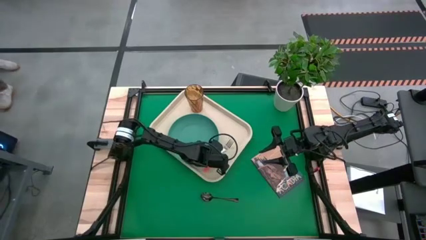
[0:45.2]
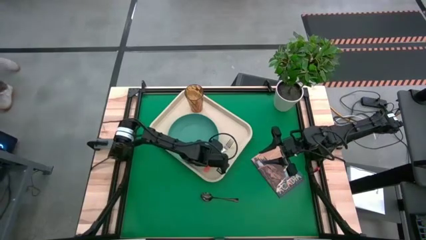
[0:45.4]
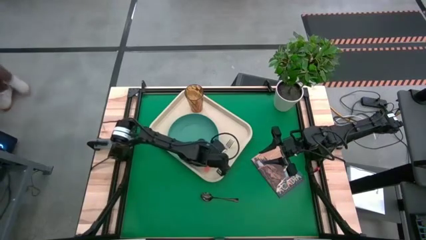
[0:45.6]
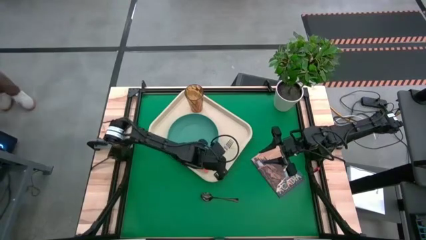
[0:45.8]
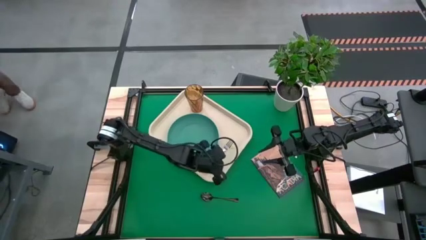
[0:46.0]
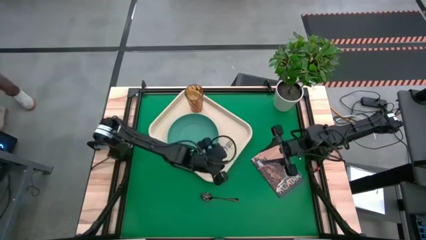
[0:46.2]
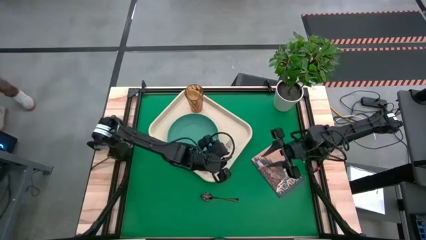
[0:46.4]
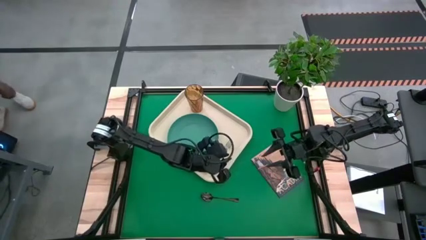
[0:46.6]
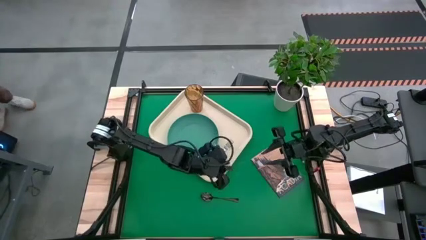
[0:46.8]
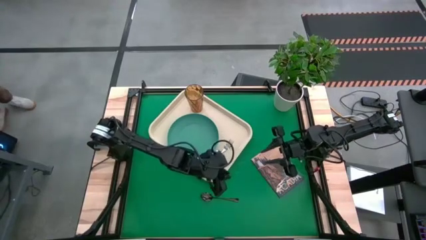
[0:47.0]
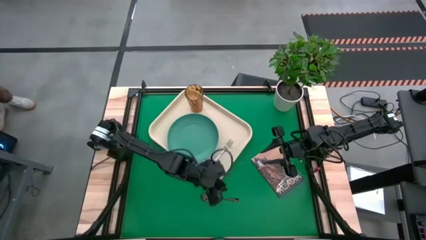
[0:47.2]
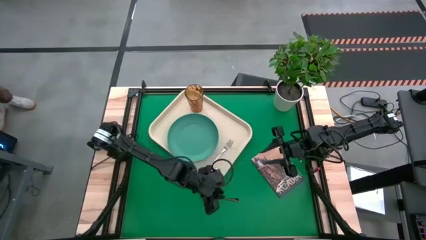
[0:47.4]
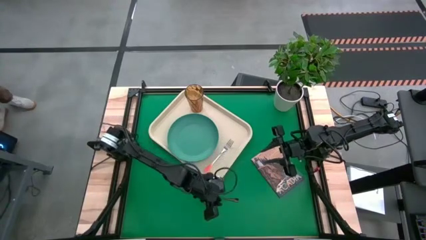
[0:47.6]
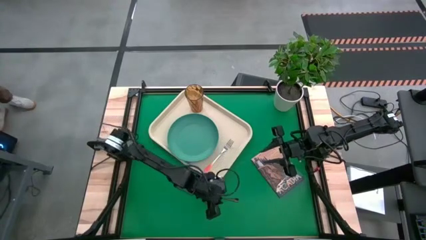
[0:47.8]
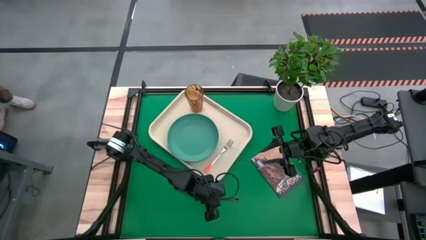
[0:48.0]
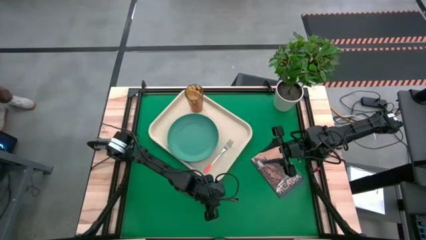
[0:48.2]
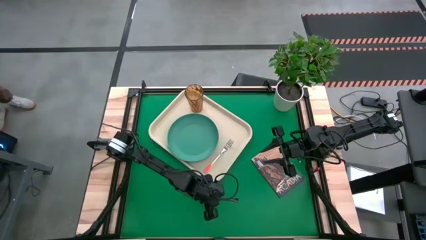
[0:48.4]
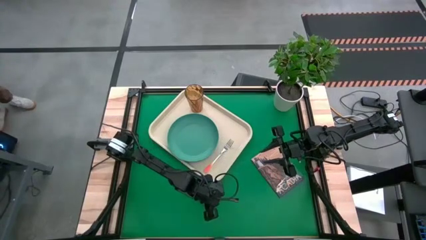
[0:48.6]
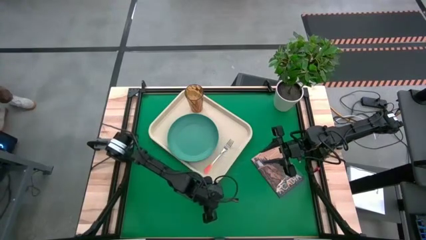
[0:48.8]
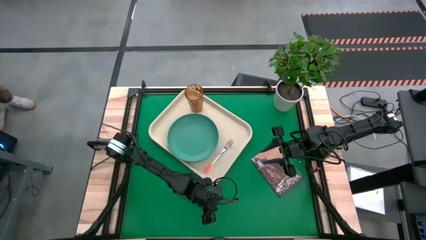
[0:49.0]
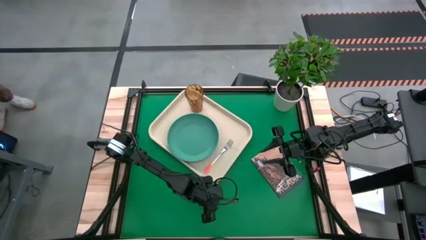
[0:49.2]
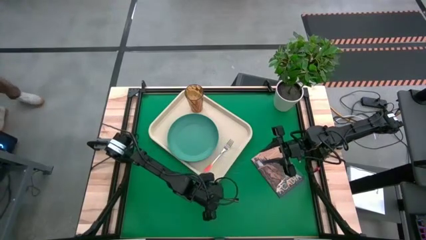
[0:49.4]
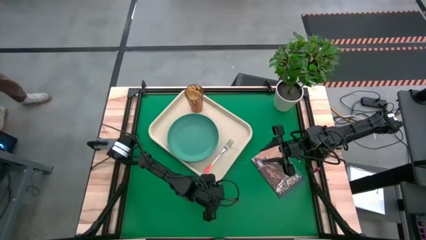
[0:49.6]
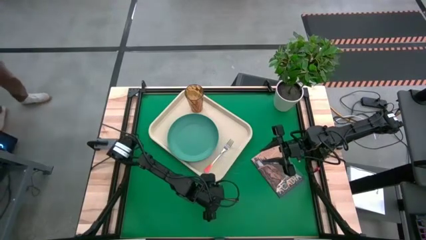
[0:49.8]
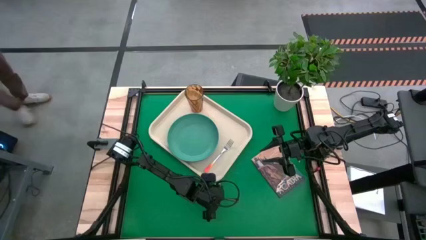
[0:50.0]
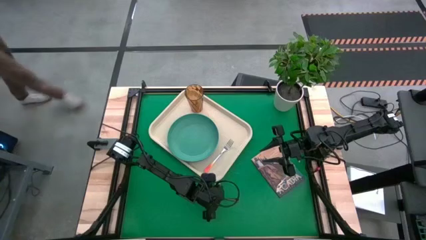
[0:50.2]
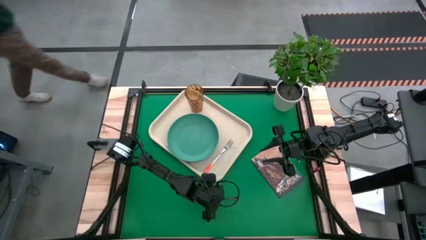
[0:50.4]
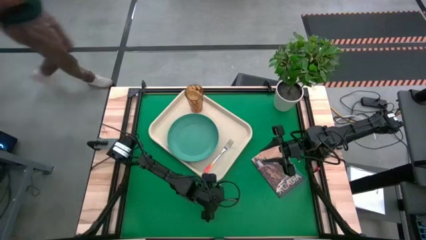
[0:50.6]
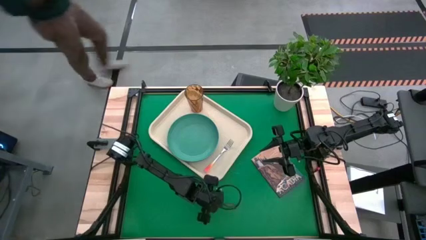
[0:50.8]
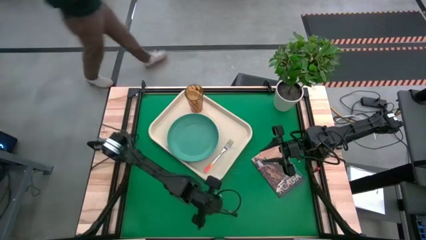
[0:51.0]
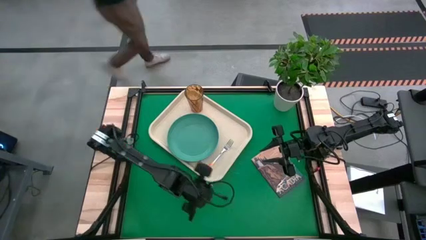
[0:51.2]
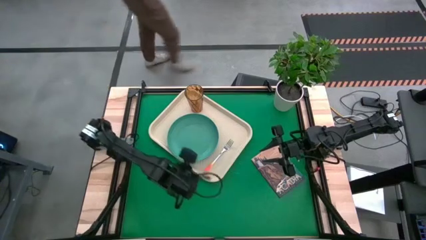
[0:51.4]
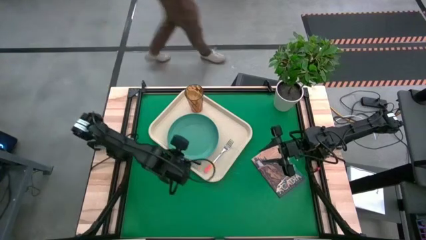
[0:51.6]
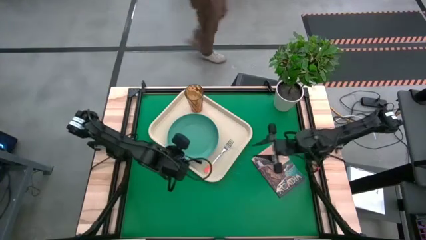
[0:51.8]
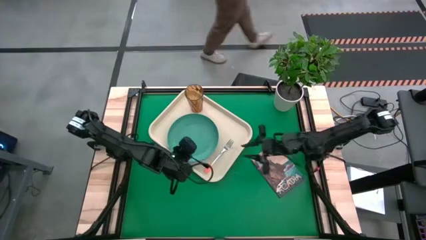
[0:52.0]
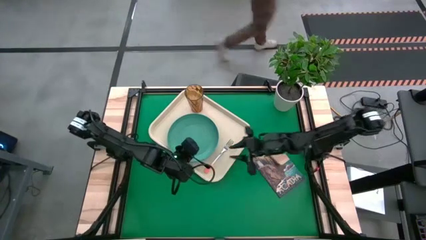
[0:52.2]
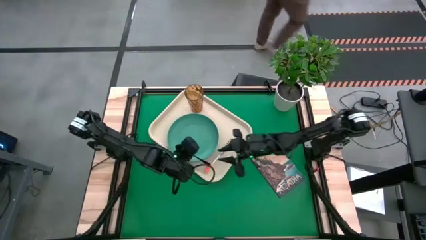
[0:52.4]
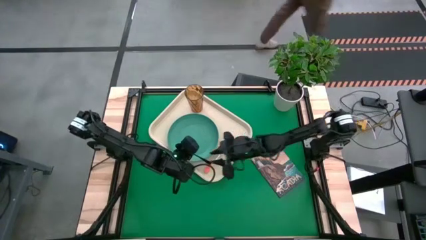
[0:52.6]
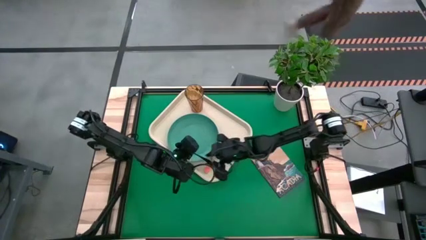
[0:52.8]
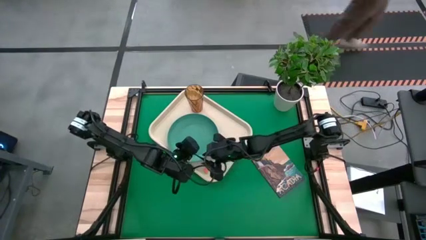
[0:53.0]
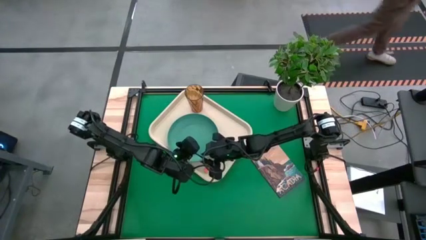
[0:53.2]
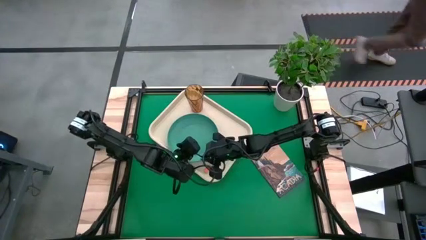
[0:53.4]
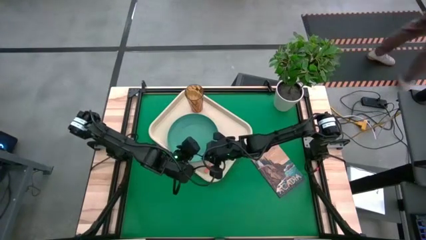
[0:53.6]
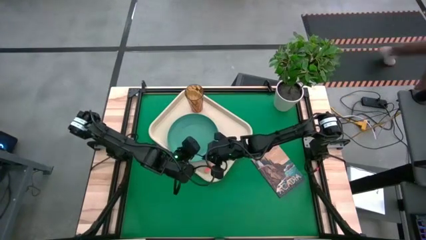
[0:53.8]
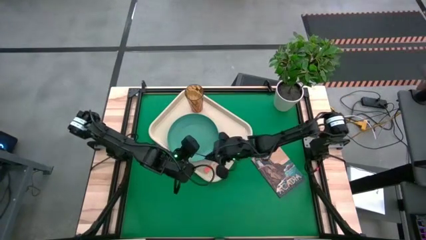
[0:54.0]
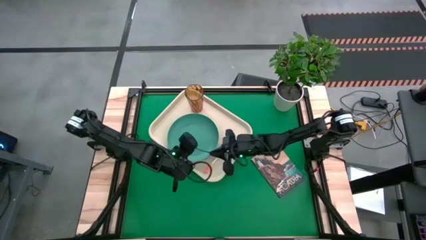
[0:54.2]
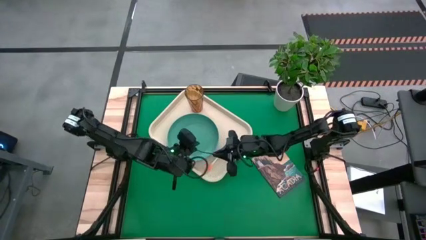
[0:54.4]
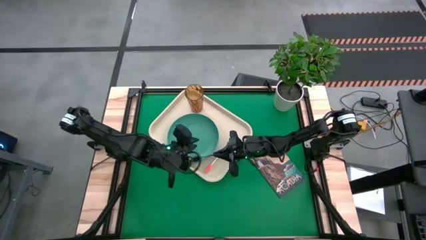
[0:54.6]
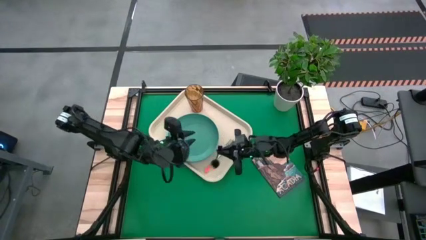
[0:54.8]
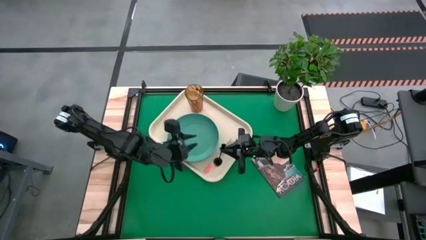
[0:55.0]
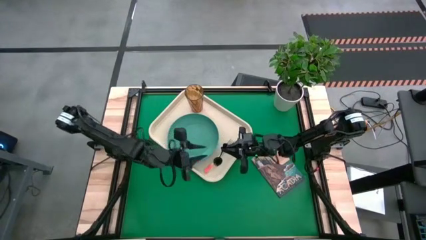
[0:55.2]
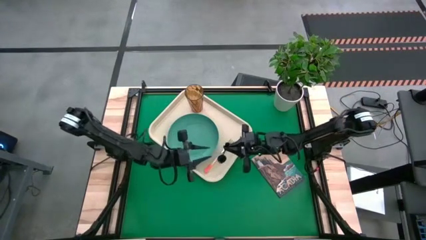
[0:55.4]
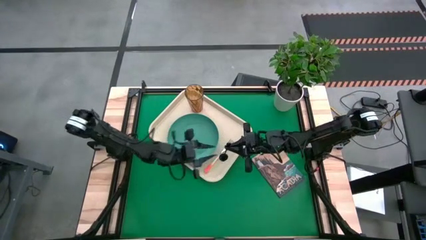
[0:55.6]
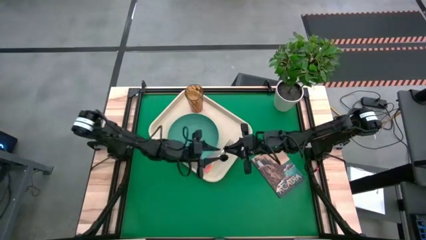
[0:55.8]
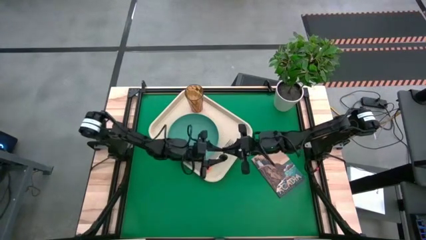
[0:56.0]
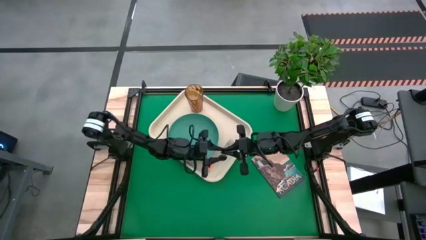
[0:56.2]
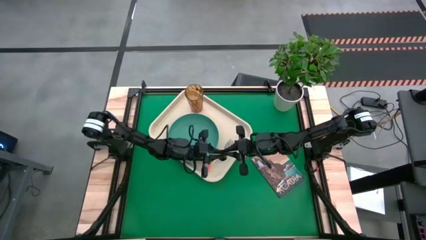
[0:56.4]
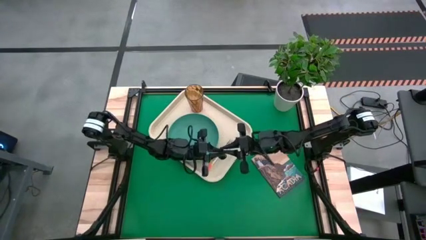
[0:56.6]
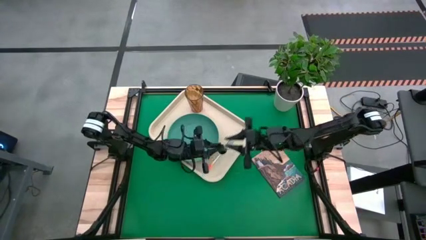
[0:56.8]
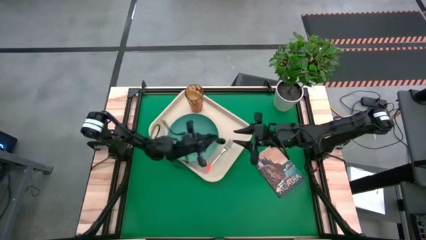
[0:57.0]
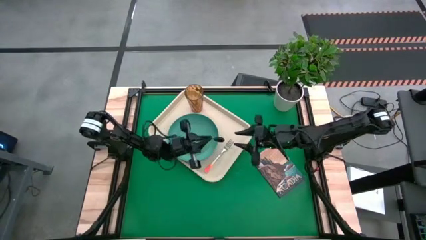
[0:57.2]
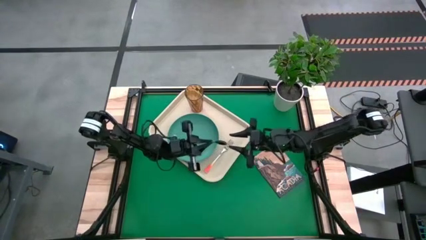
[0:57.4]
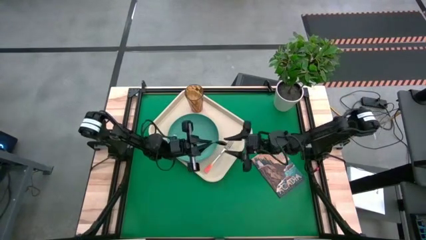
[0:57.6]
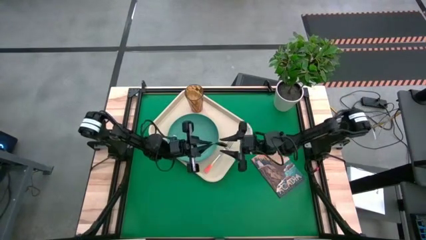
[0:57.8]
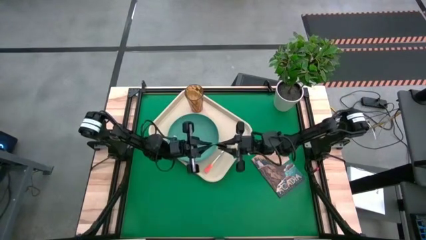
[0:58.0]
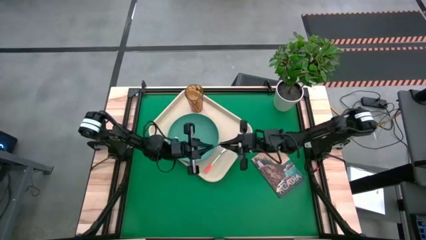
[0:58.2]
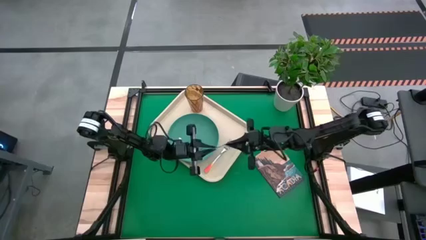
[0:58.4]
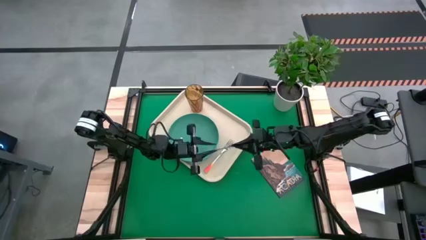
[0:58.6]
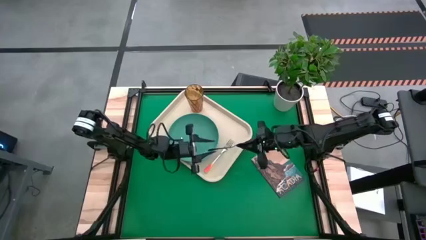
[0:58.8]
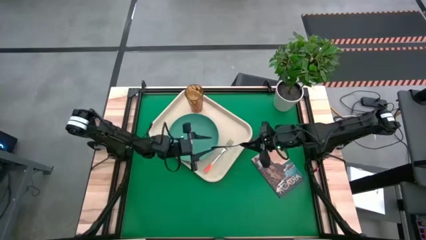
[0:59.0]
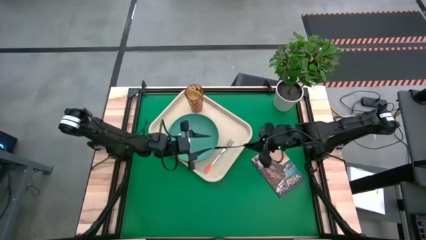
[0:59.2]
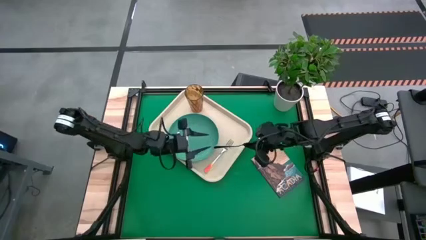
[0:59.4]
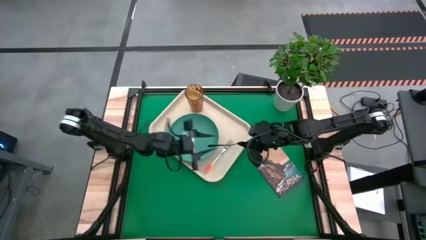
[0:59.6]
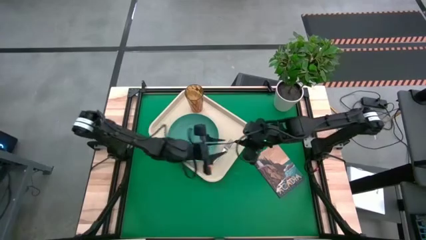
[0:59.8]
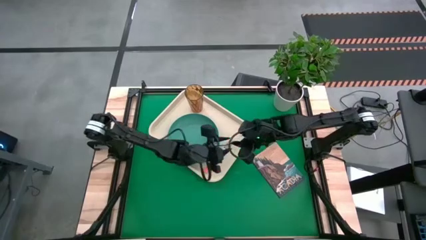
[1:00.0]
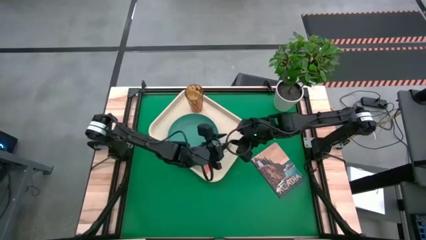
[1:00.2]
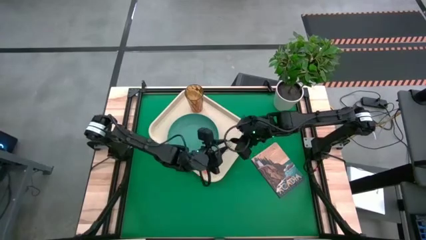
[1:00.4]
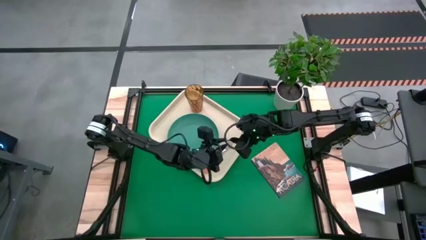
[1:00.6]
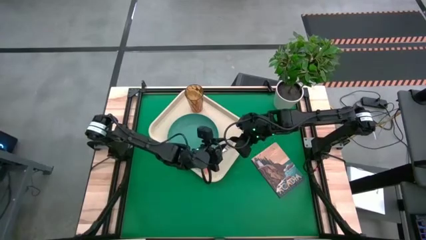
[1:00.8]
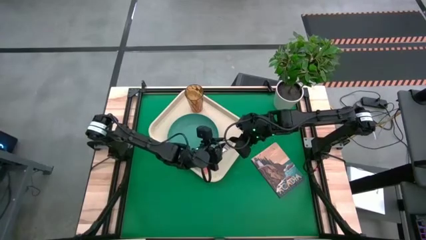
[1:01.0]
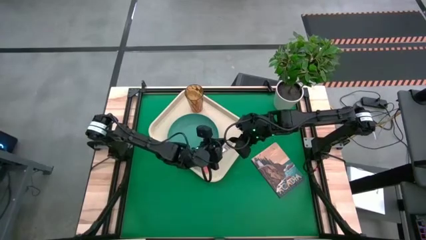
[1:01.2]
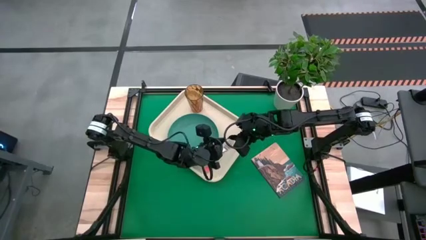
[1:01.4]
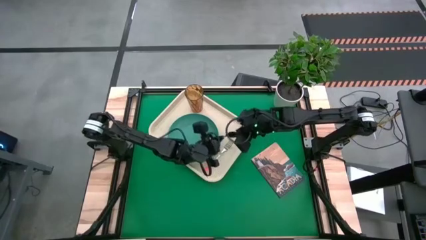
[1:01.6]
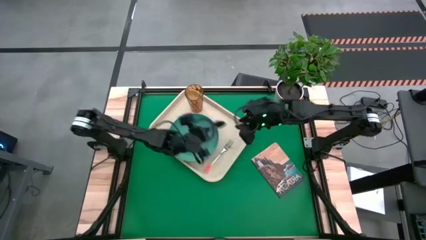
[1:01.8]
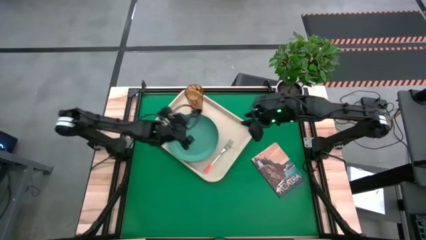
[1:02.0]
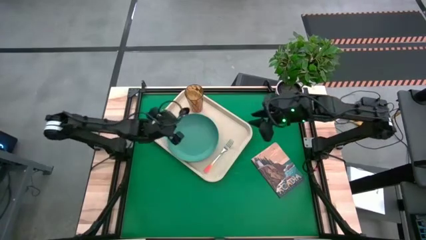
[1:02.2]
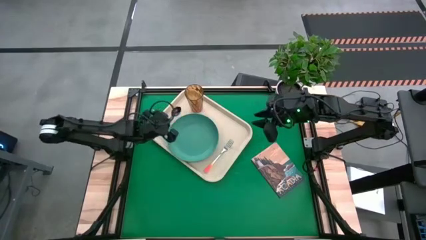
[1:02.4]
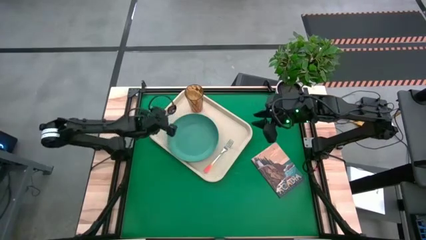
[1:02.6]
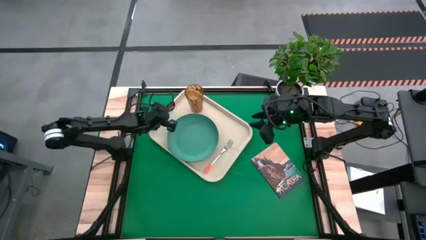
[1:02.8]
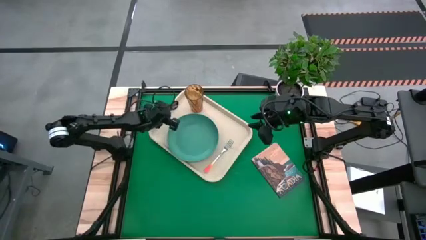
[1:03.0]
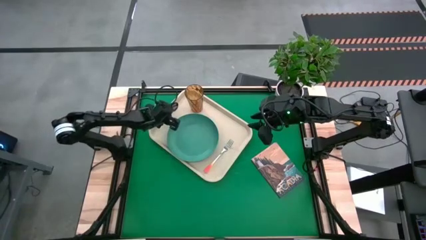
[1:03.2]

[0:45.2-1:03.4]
Task: Pick and place plate/cup/fork/spoon on tray
Put the black spoon on the white tray to the left of the green plate
